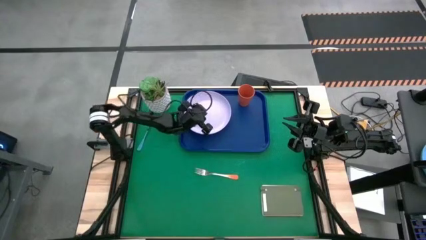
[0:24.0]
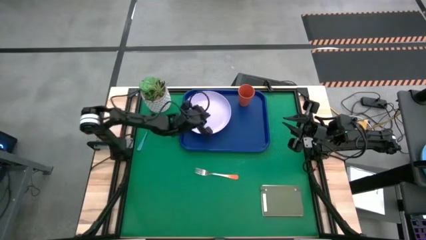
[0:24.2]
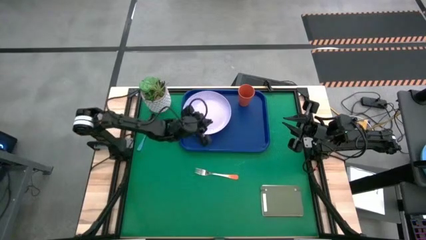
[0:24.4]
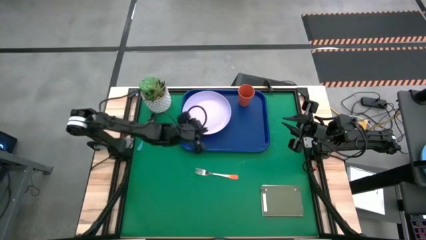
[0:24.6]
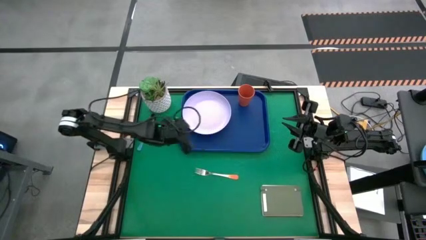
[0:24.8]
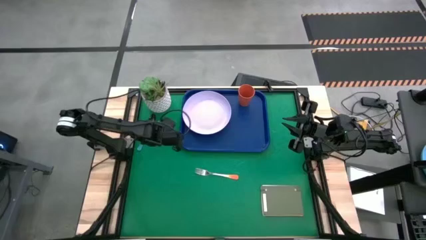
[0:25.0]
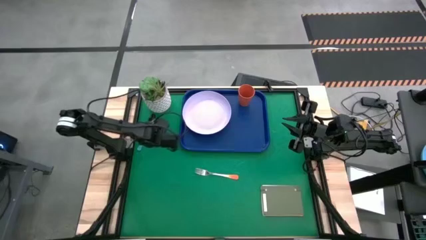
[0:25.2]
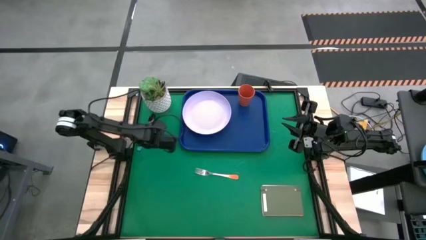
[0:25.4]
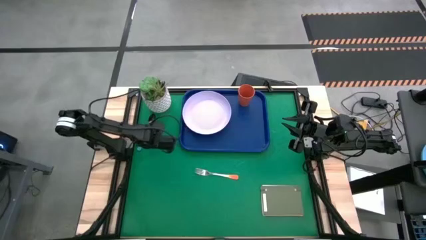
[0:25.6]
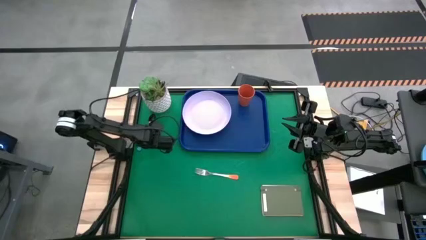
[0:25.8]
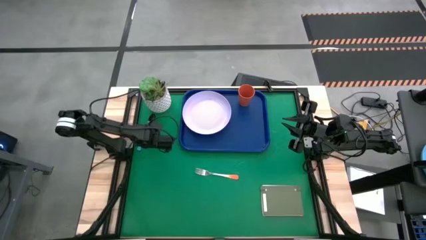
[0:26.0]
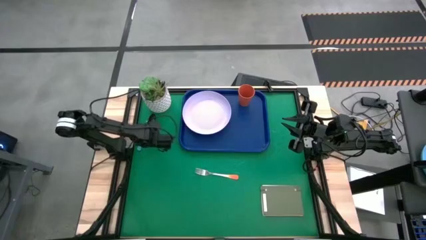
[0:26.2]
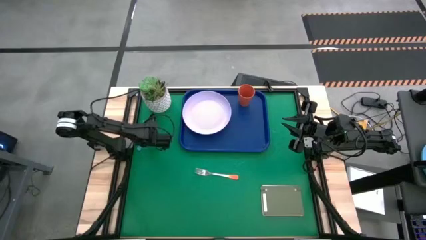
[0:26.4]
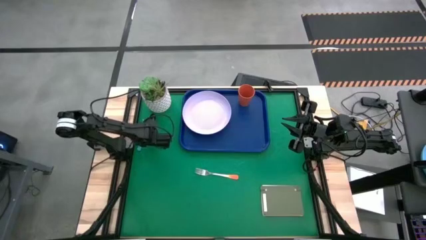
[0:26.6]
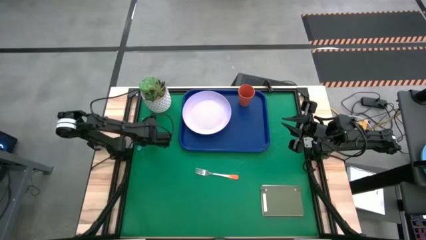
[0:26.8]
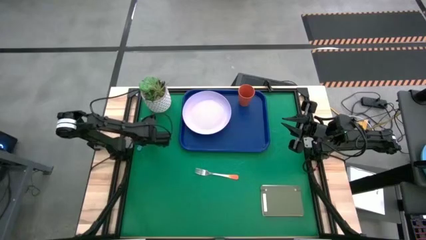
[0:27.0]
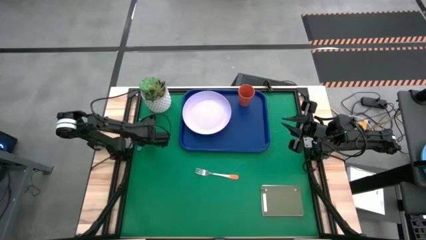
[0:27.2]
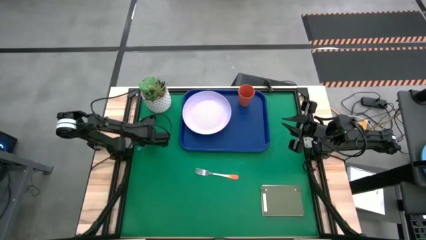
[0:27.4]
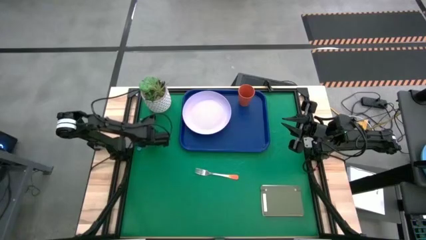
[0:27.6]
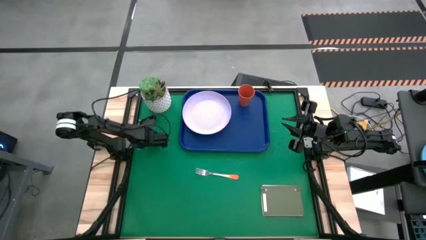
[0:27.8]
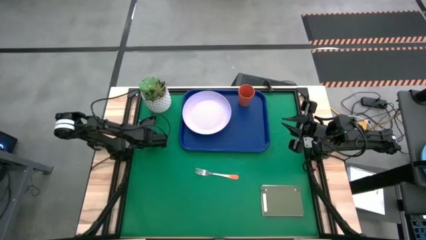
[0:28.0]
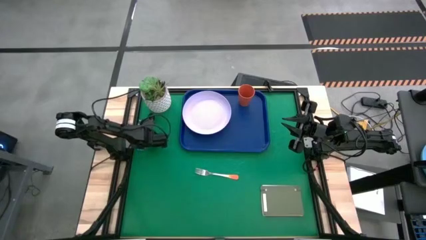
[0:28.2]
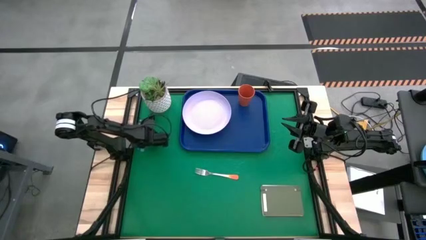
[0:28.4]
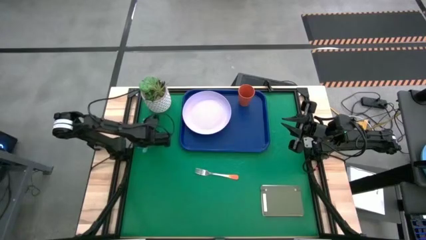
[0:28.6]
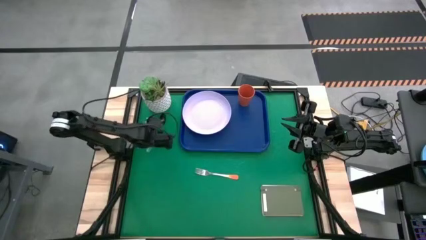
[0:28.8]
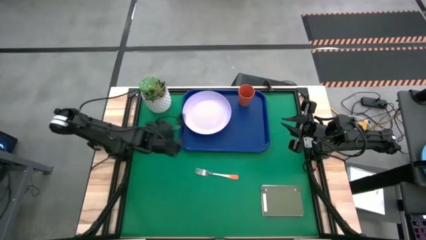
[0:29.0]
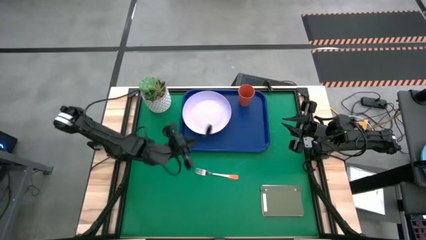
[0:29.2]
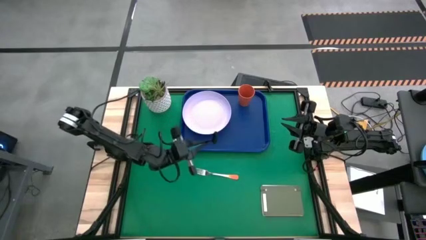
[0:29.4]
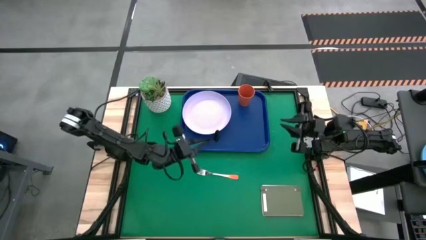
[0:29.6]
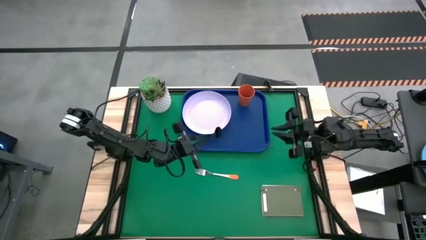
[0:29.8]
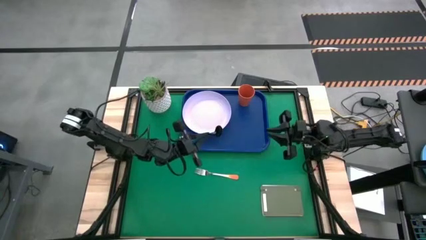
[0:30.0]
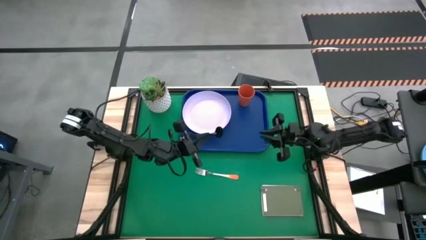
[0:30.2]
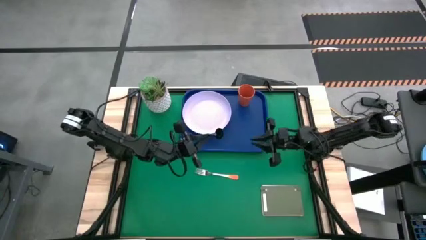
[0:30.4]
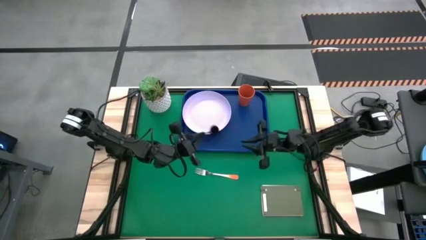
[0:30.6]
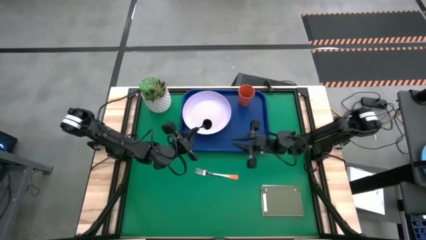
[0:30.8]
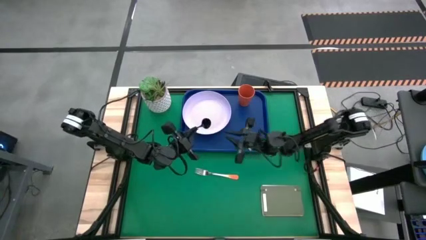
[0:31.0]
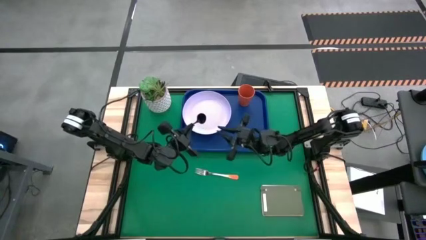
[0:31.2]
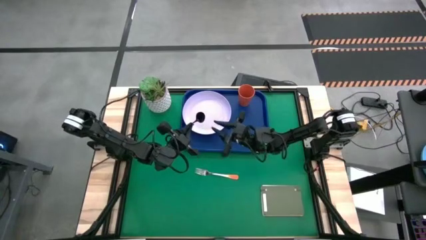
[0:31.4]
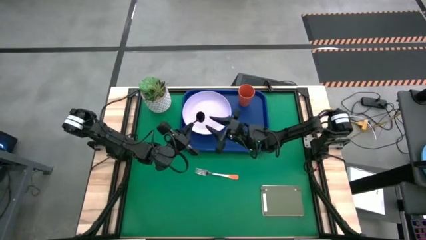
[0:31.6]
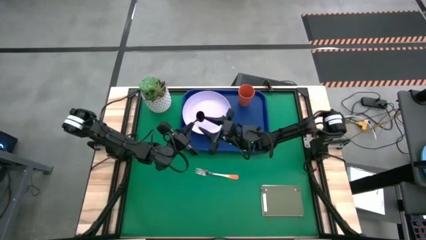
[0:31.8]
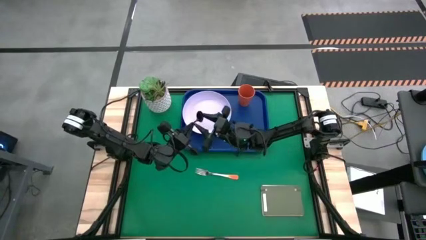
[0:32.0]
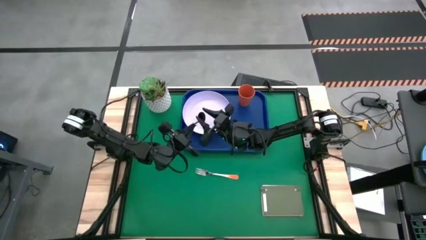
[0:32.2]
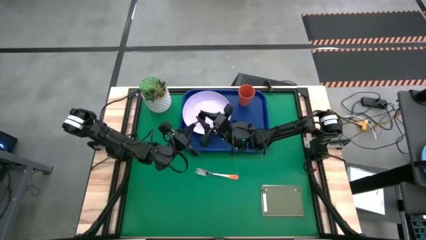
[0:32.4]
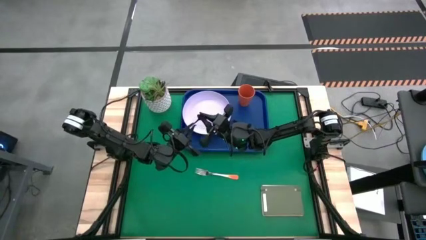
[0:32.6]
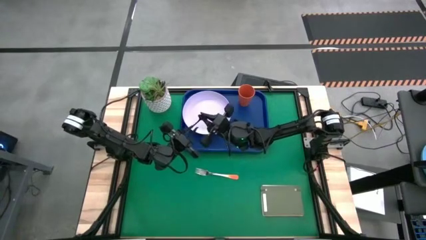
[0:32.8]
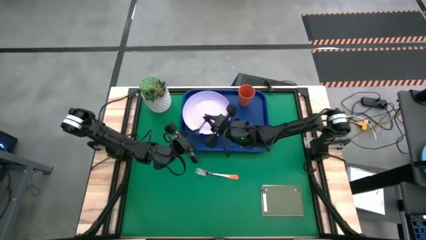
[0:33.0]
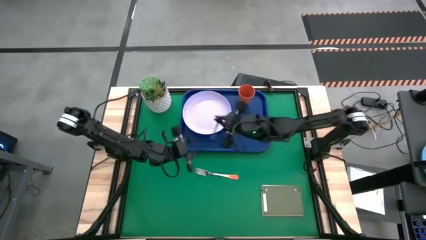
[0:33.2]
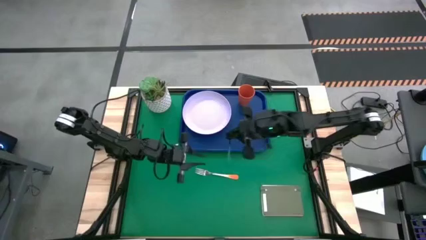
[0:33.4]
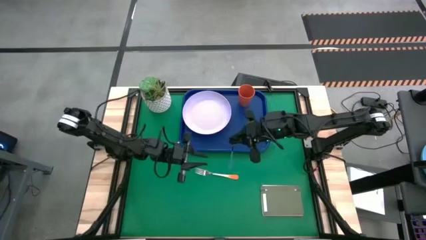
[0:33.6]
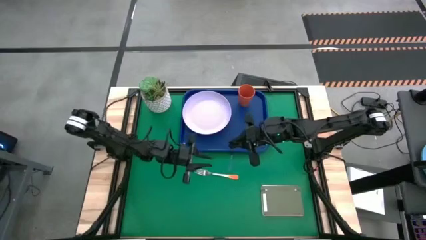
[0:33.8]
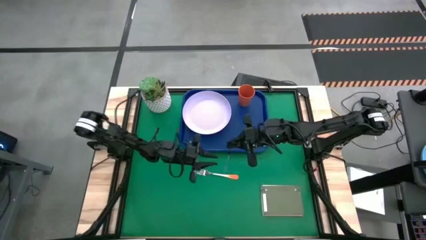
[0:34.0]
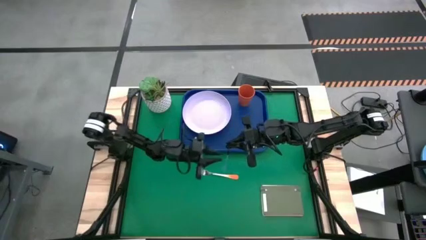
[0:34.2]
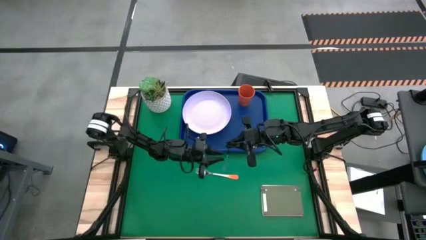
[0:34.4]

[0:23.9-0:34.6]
Task: Pick and place plate/cup/fork/spoon on tray
Put the blue spoon on the right side of the blue serving tray

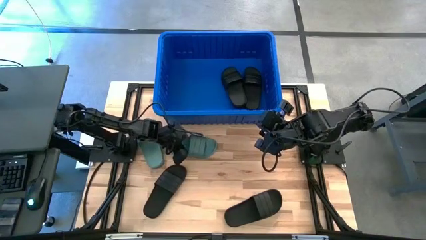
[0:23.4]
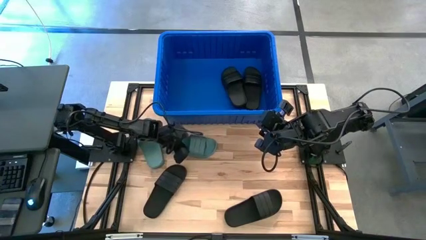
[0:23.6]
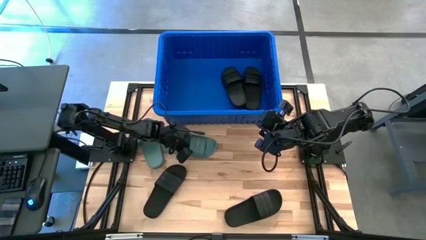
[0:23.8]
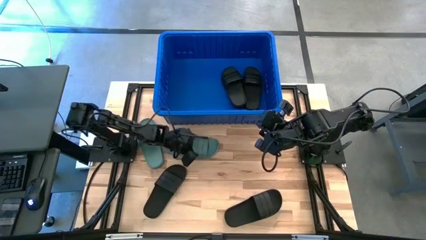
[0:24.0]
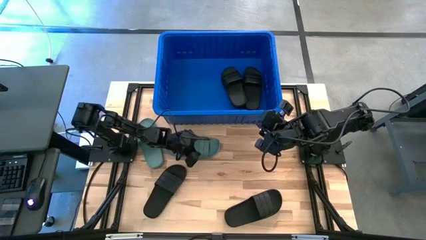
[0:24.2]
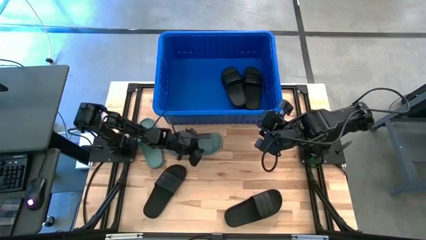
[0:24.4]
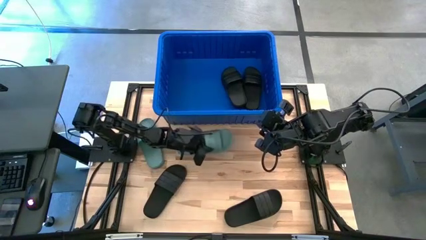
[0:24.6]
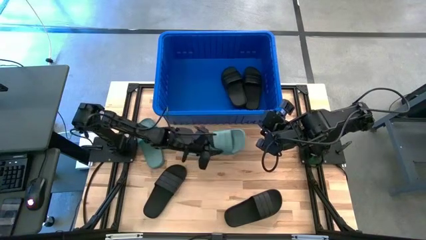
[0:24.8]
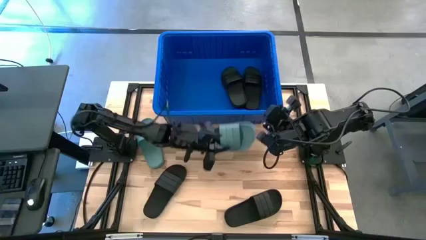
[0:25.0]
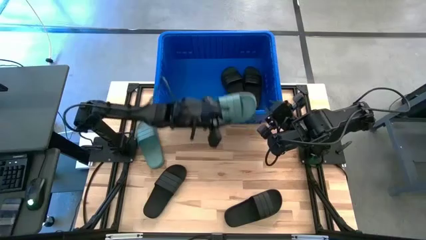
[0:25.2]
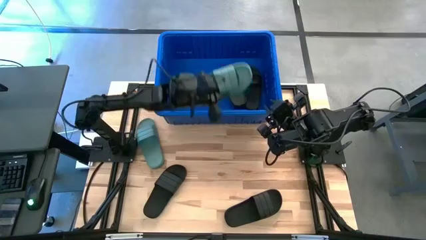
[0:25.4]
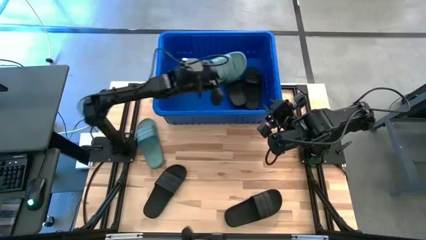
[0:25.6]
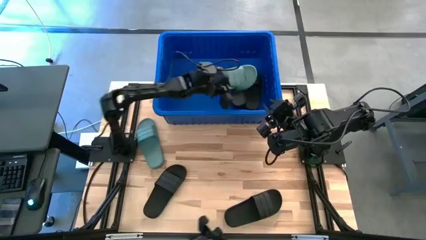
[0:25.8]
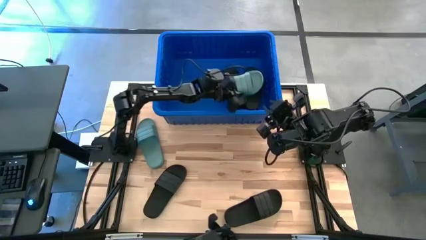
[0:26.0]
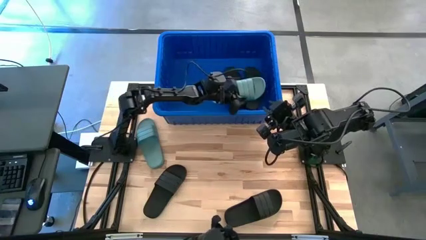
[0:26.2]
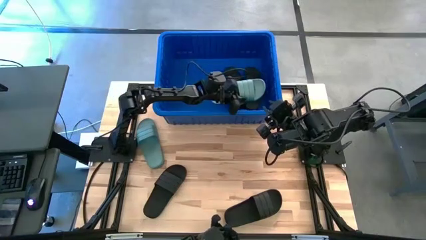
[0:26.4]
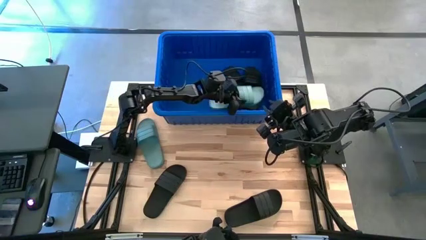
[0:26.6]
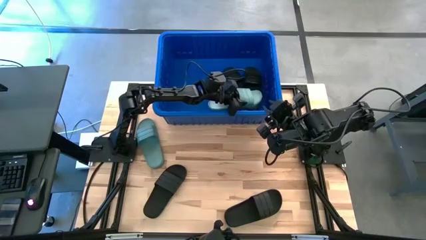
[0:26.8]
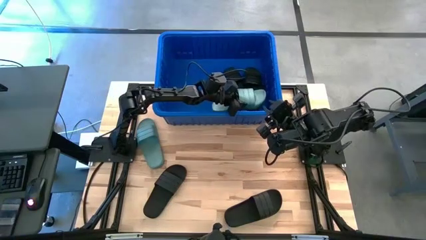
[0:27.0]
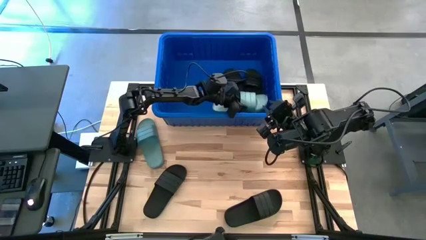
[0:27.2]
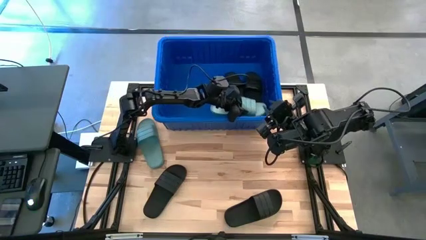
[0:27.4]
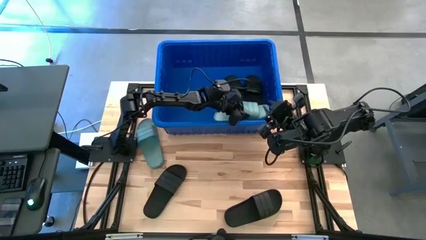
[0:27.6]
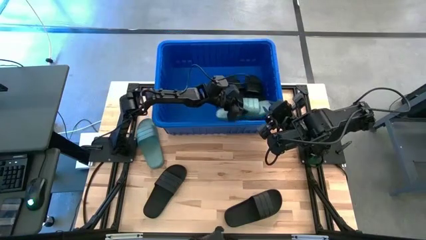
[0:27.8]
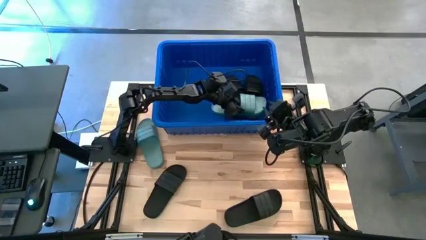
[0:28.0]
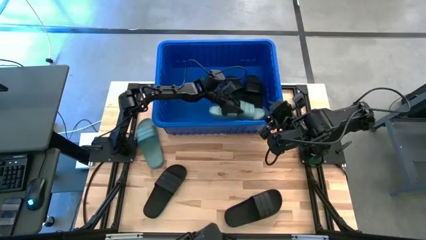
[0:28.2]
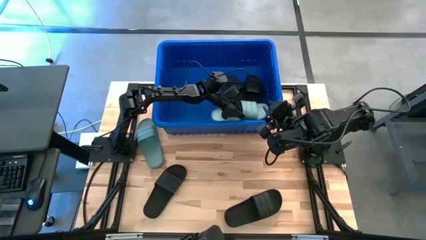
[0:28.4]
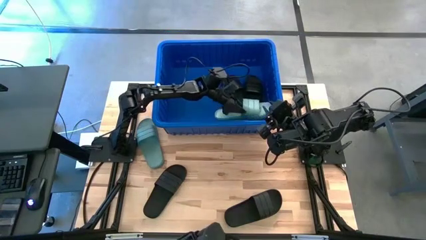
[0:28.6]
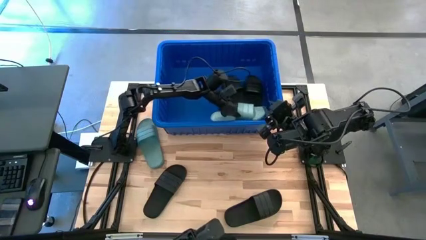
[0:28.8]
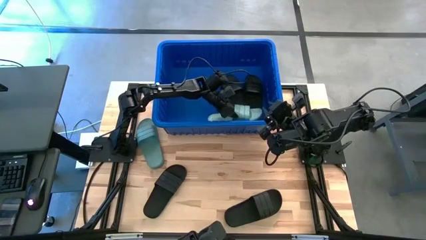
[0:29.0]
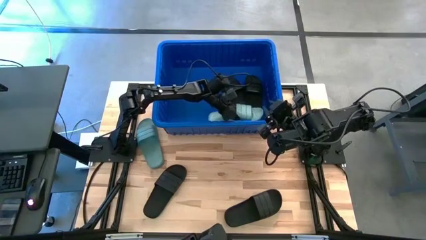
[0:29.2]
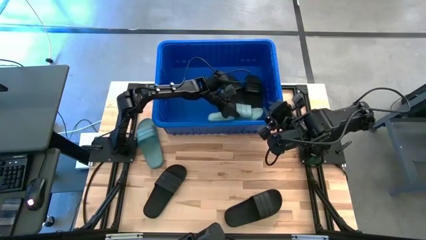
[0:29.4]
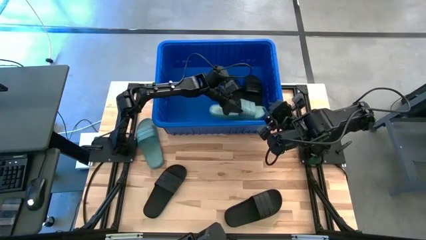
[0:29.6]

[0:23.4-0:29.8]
Task: Pick and place slides into bin
Put the green slide into the blue bin
